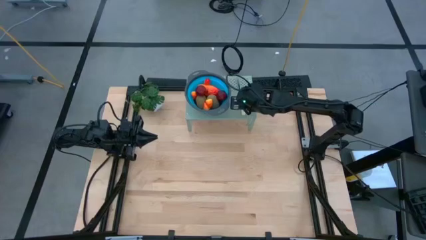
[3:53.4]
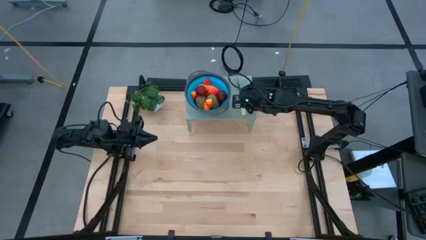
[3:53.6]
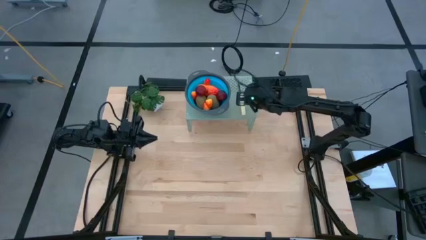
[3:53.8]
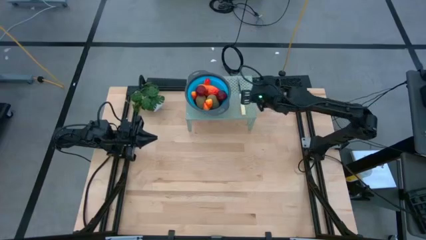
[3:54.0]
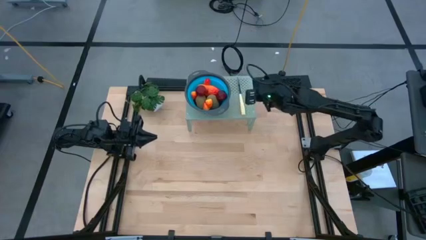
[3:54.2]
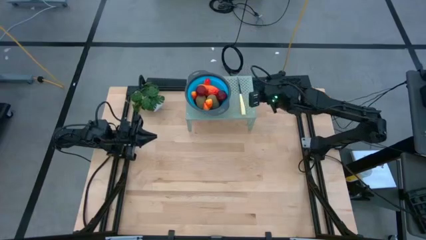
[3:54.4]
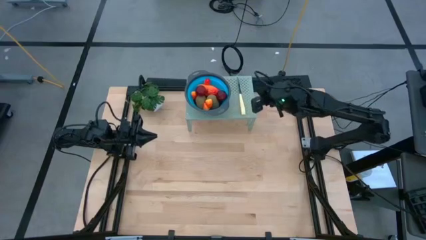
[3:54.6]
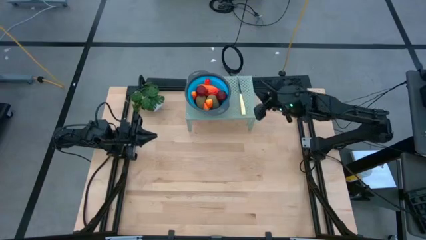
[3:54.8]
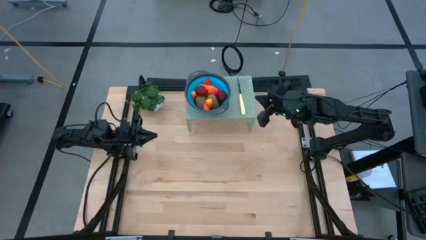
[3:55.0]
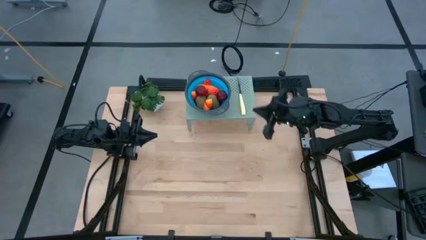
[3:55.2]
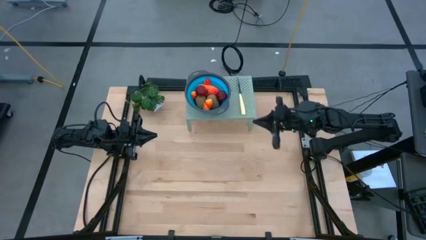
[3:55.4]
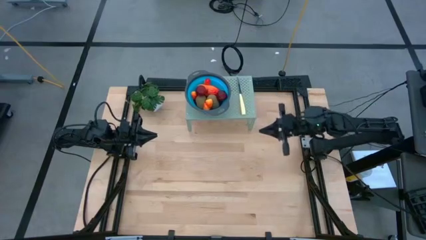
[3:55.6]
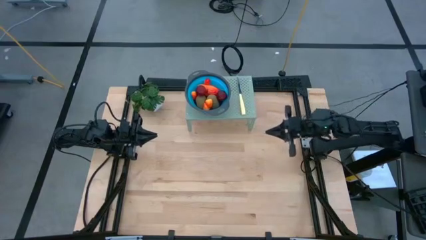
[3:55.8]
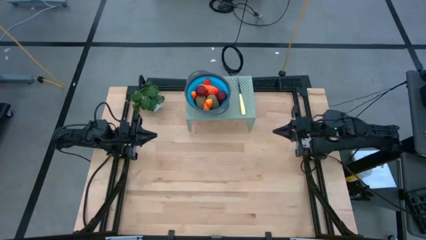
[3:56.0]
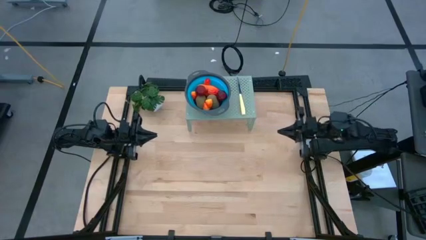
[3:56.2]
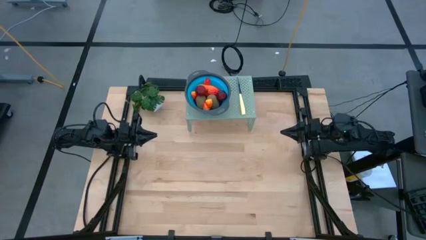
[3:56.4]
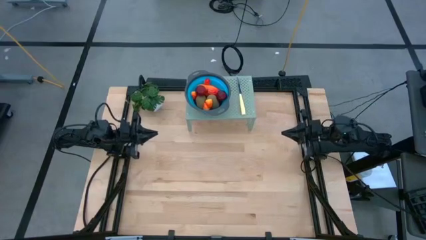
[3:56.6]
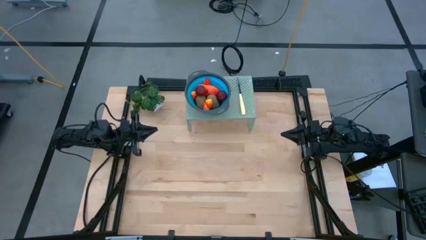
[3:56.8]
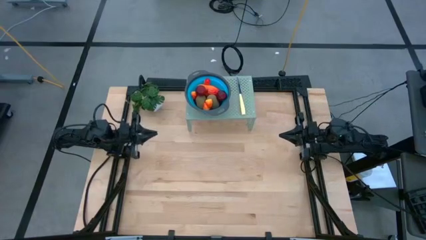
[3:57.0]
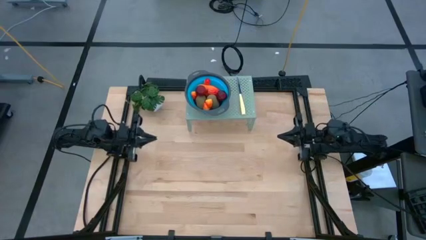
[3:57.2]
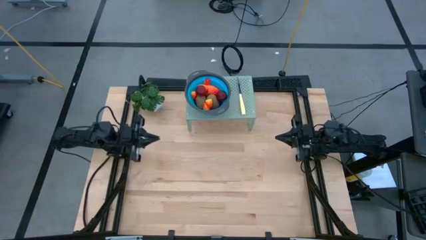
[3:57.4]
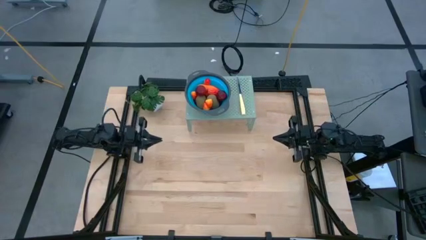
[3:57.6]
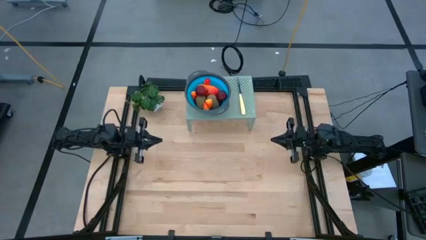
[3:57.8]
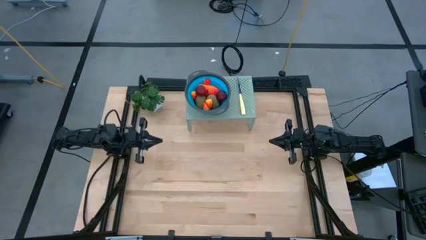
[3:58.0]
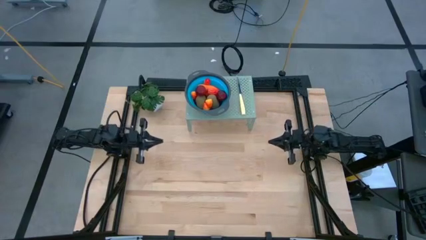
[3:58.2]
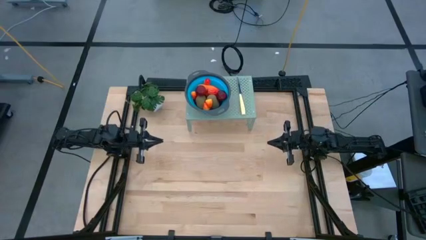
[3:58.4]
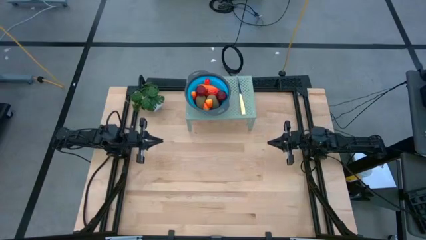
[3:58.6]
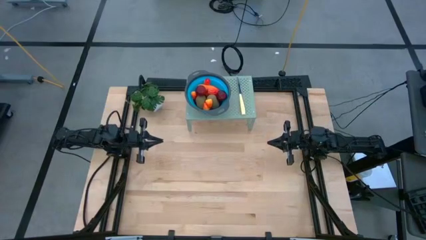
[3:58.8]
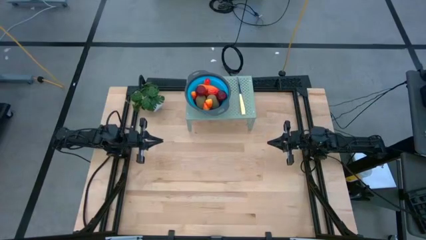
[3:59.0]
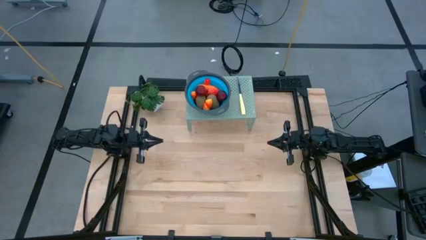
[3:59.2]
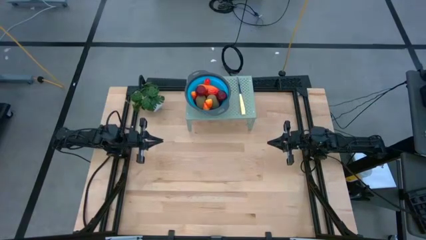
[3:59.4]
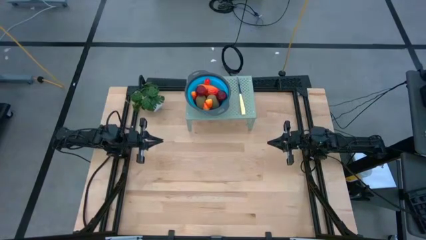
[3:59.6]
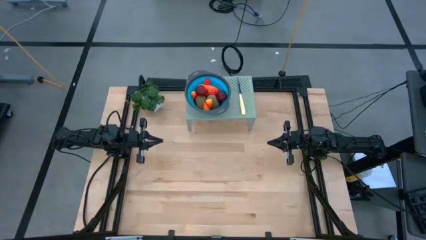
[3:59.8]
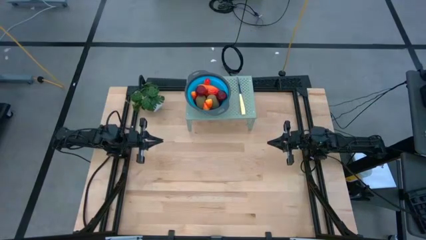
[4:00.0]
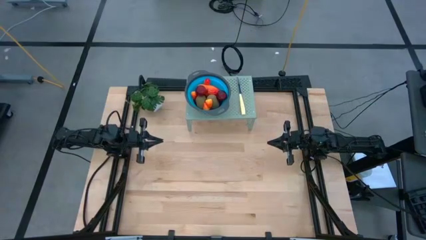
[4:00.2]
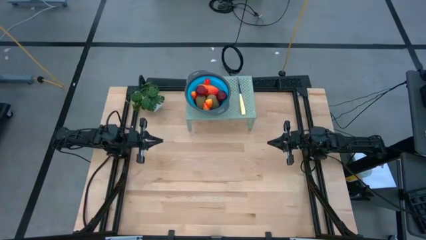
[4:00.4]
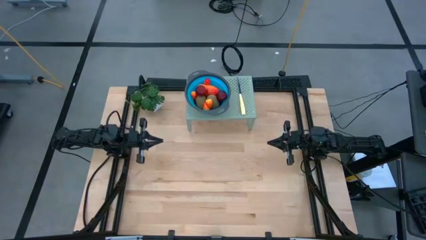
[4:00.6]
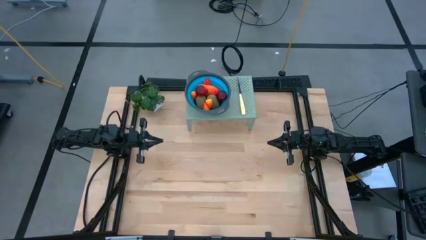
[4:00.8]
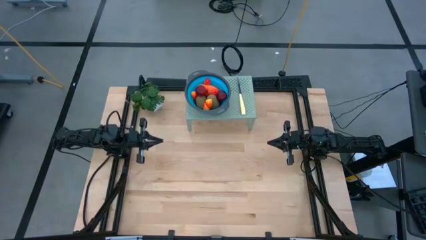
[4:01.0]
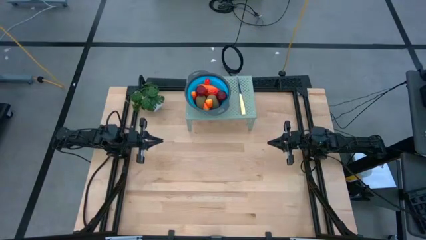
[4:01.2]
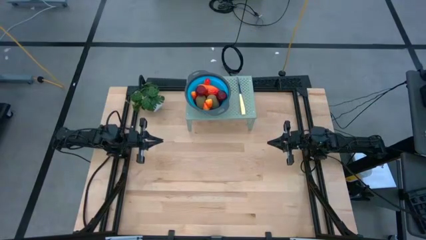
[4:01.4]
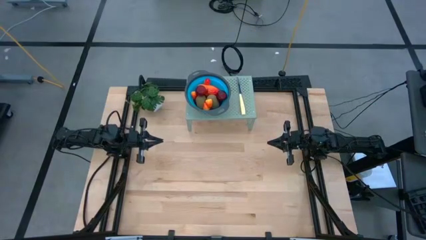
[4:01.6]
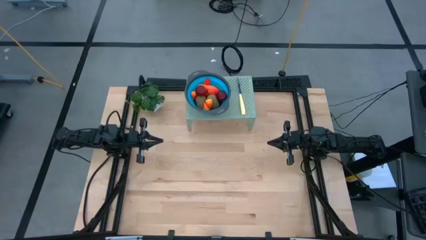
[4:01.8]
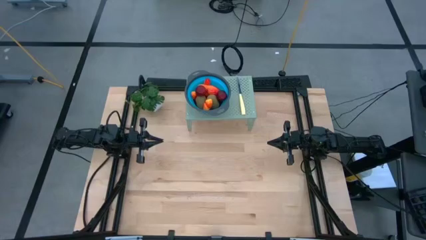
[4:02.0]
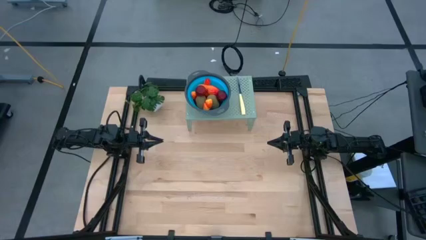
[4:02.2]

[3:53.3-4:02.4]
Task: Pick & Place Fruit
Return to Home Position

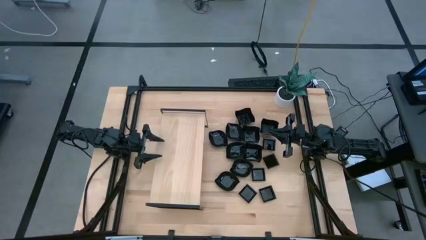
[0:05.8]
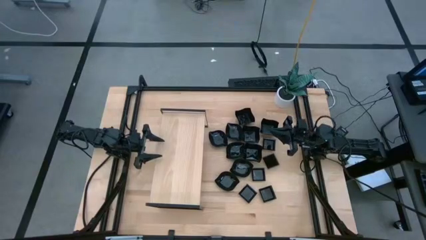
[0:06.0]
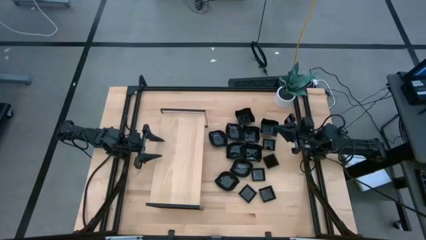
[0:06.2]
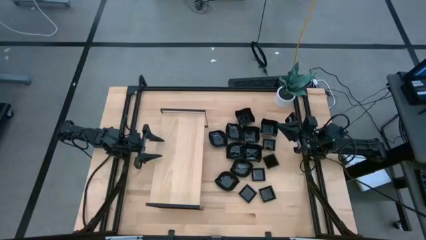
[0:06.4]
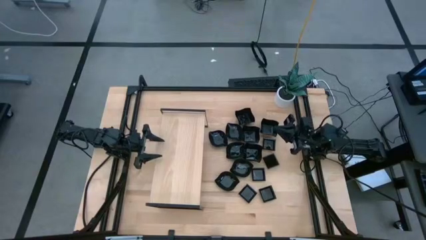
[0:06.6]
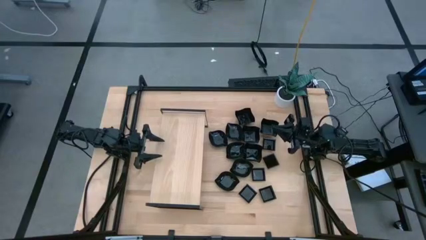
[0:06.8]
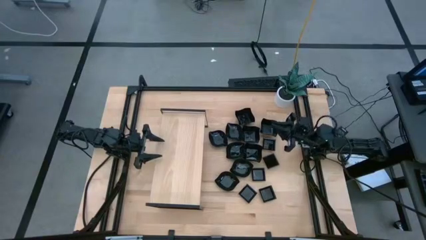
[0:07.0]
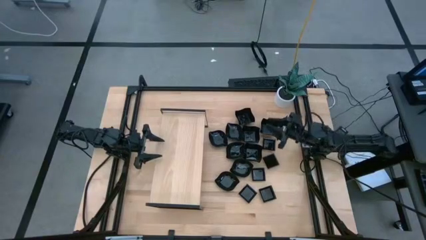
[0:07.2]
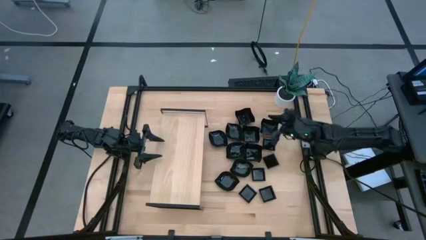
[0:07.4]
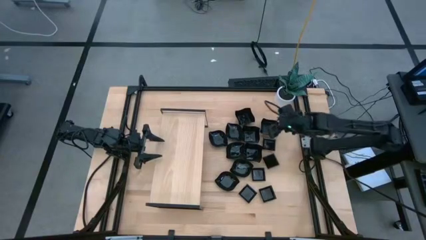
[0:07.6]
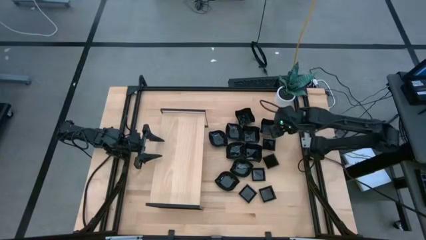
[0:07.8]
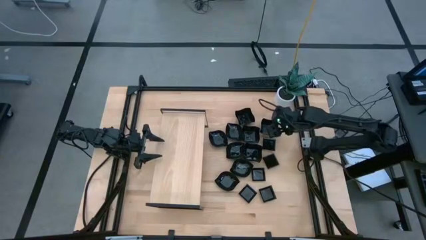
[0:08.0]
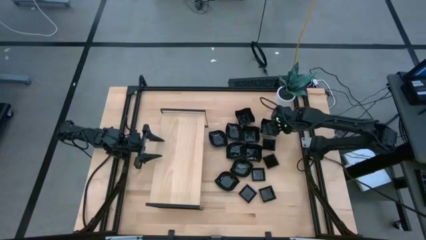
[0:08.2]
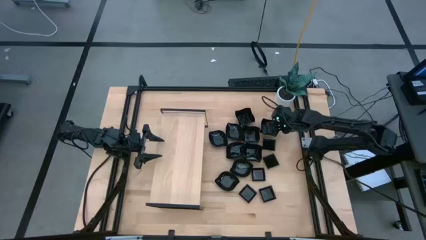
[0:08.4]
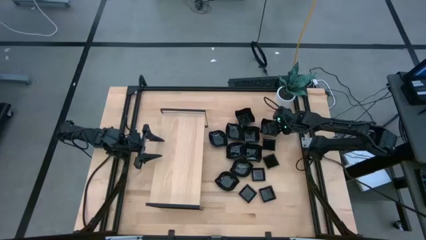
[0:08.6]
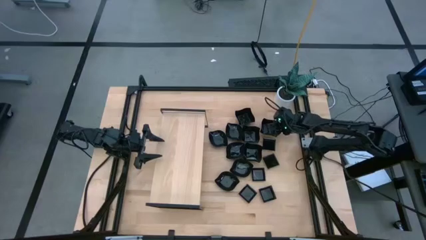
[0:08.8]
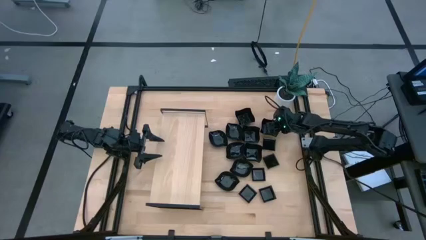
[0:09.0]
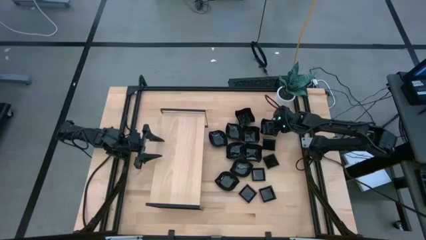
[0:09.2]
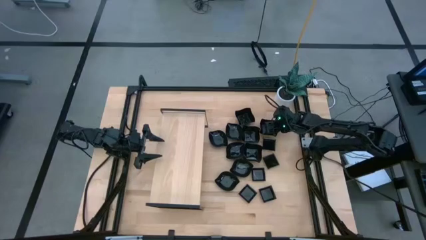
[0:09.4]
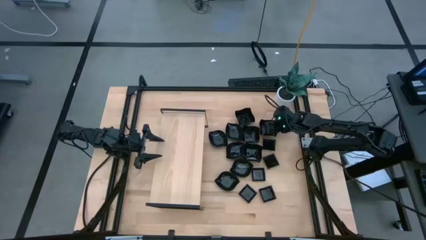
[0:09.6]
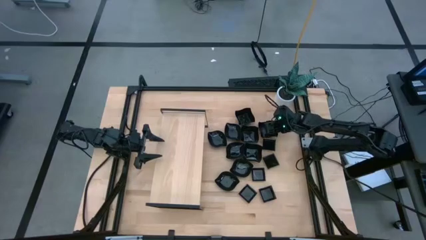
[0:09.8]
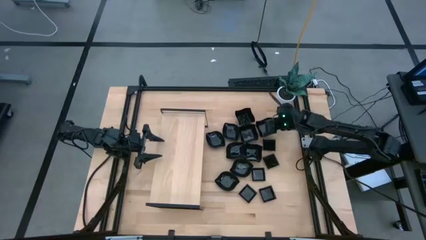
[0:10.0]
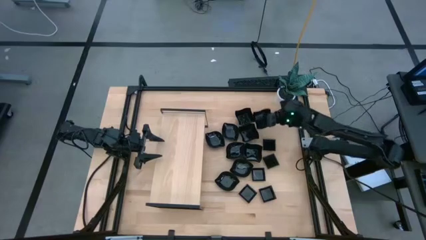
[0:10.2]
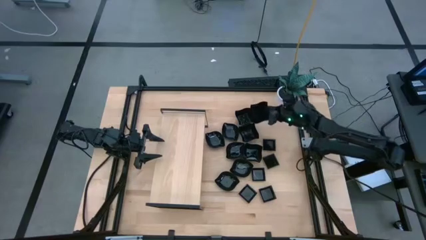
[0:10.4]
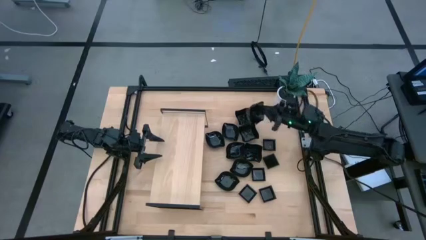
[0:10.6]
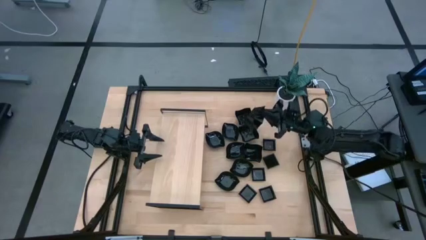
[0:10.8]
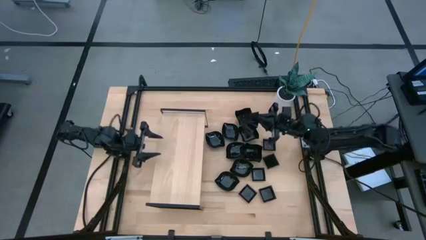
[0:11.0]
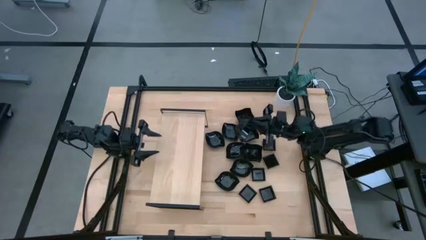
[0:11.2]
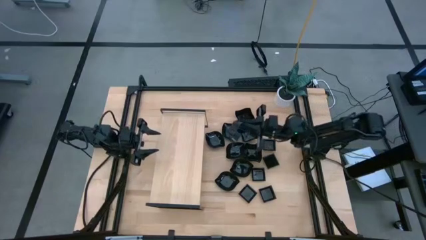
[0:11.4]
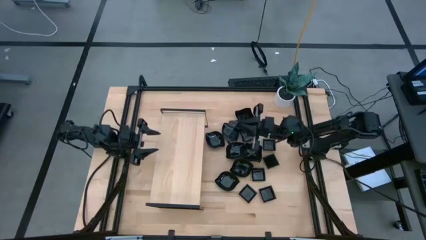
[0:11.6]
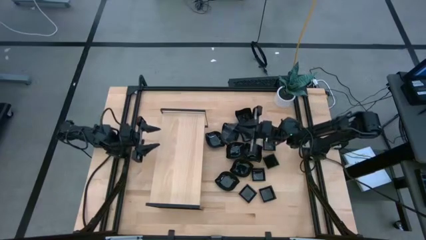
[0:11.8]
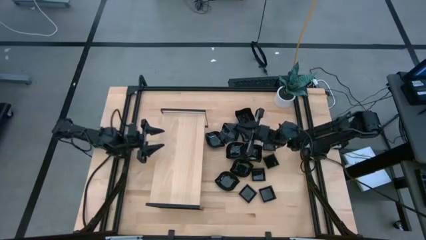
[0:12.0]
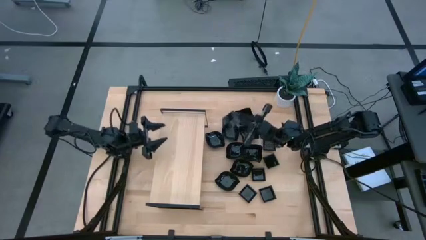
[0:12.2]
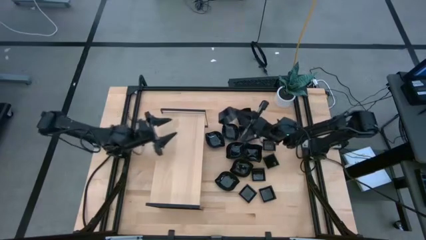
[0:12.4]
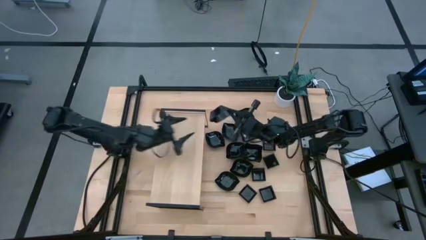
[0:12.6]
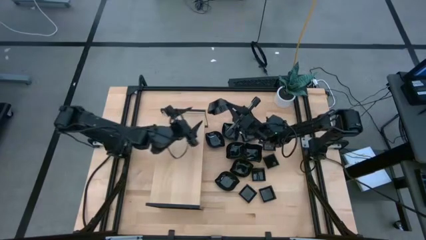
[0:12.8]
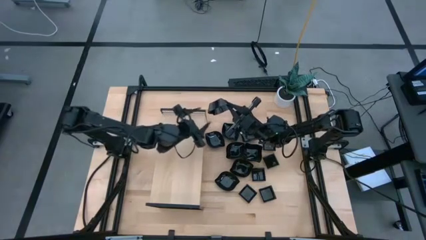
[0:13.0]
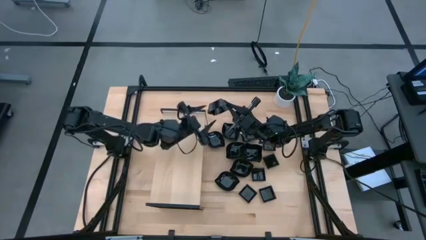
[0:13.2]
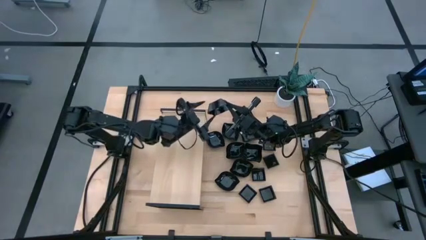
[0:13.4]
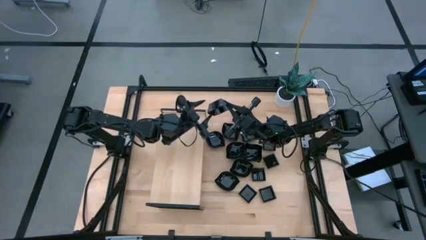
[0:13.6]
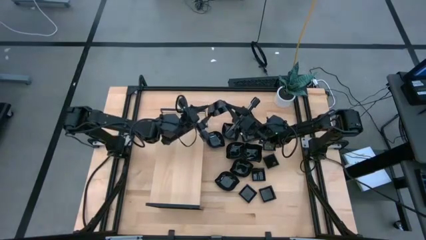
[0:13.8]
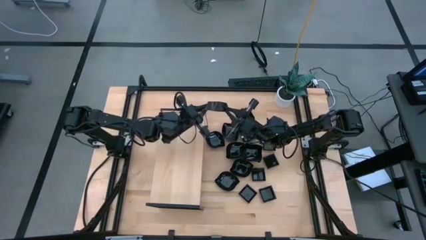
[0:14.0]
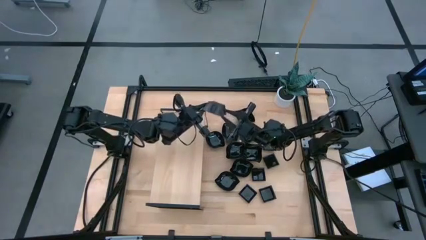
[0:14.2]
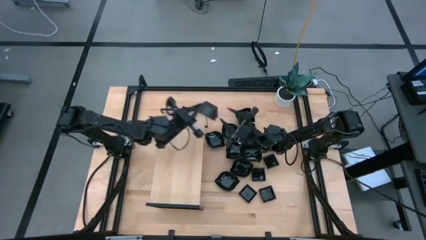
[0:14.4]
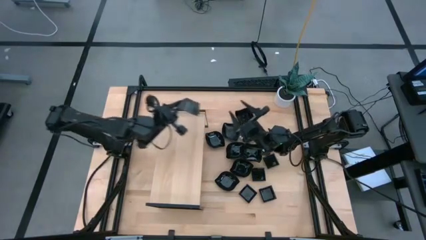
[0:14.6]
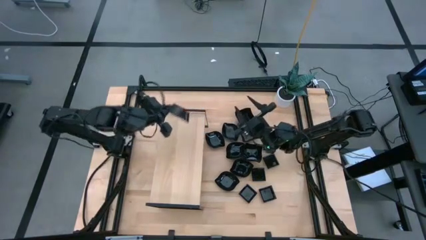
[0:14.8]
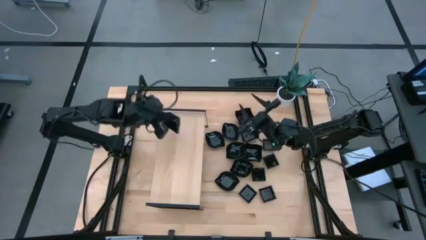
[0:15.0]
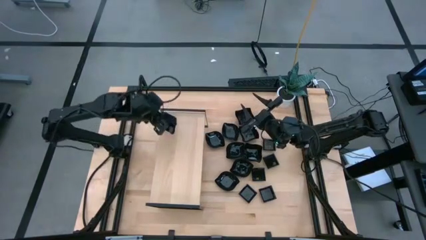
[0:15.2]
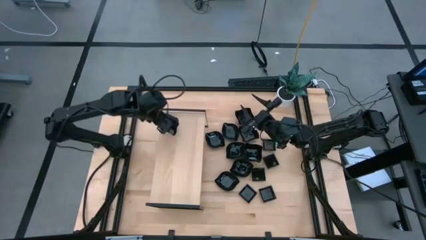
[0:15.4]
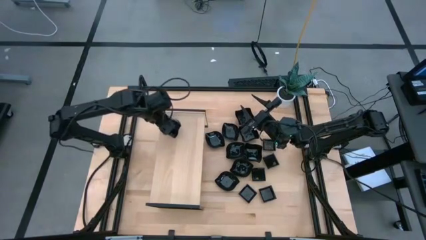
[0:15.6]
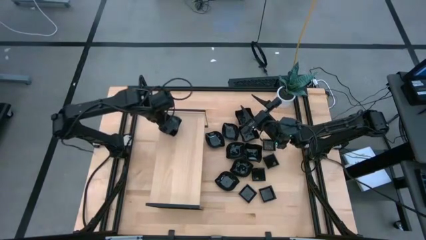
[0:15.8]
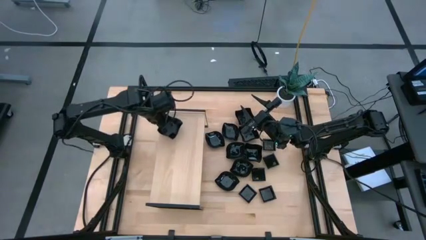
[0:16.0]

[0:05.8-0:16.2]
Task: Pick & Place Mini shaped plates
Put the distorted square plate on the shelf
